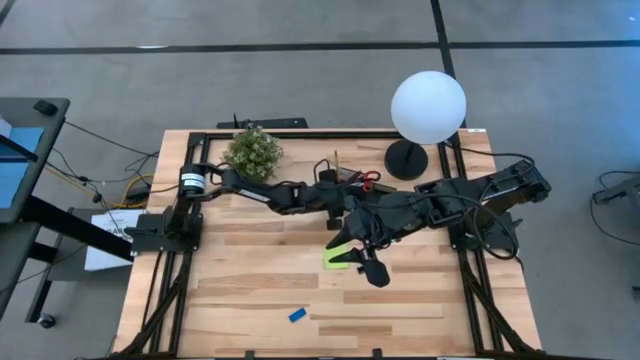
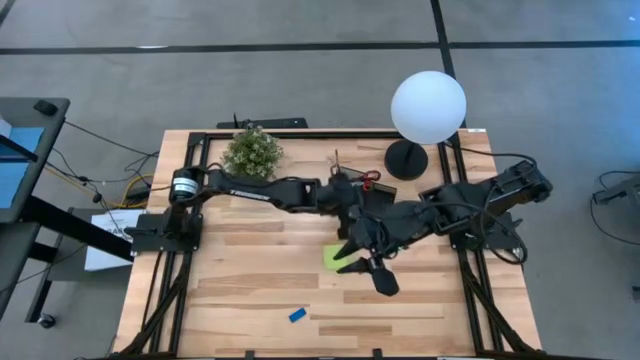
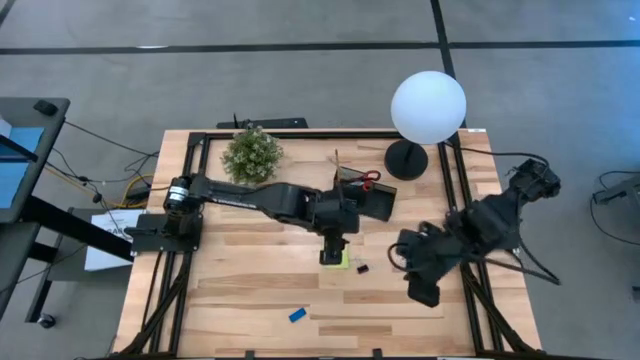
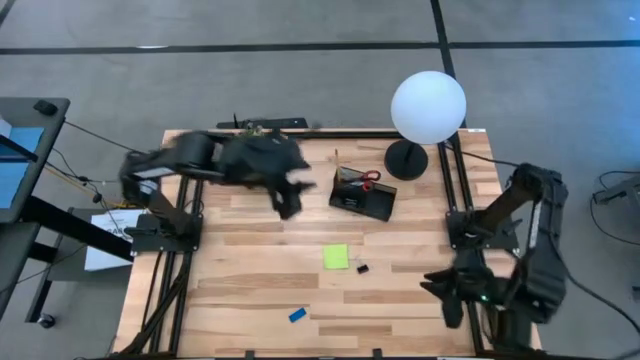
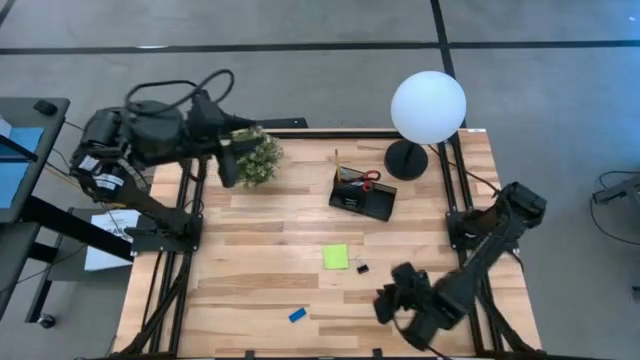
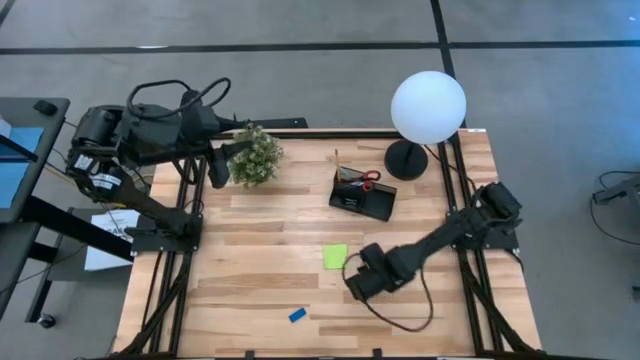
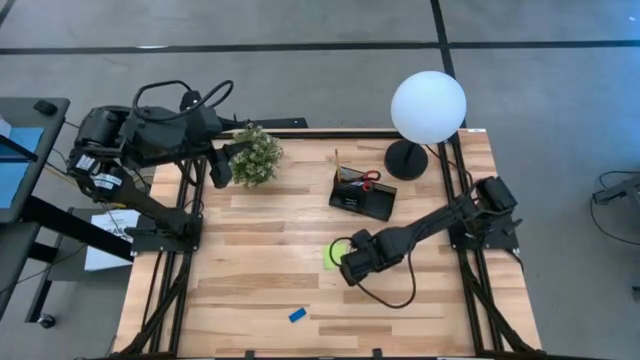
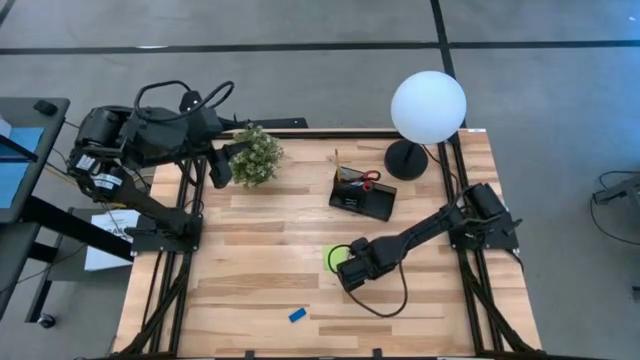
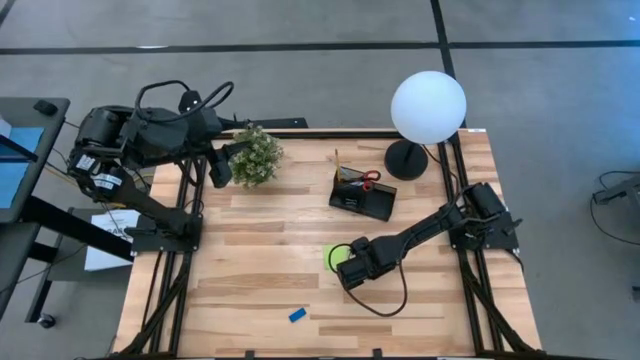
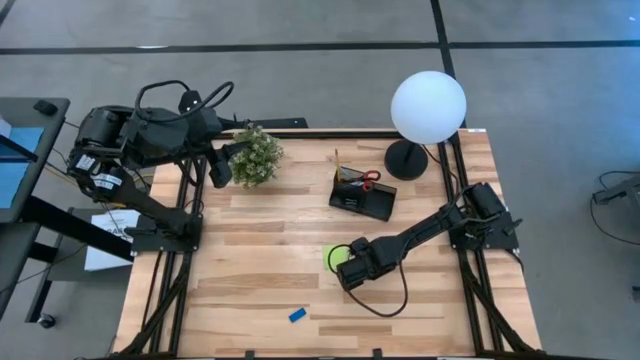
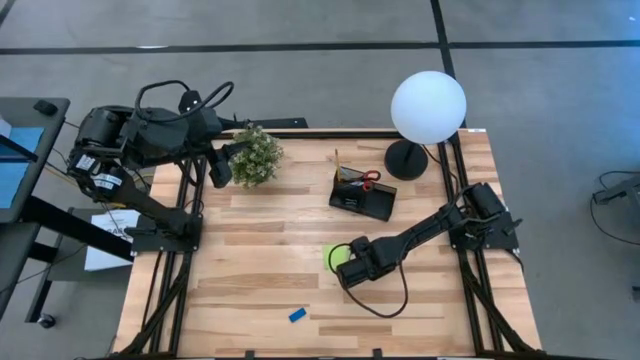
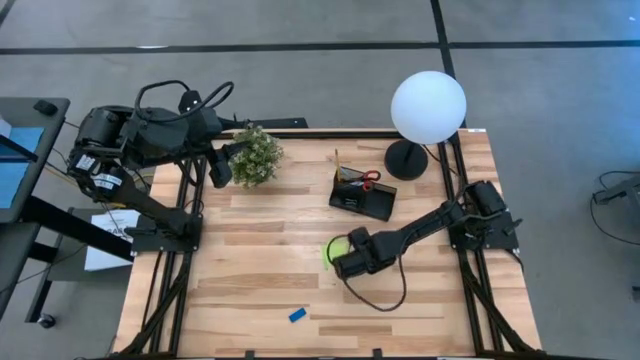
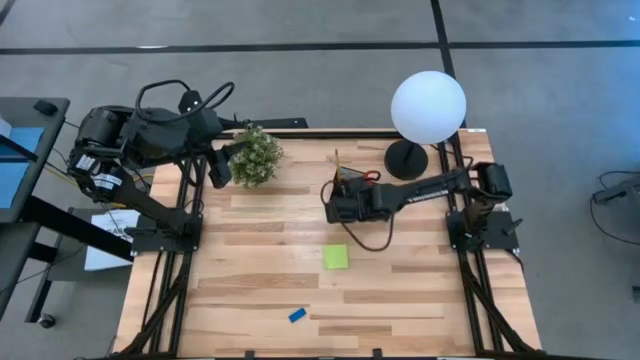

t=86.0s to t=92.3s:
Task: Pick and place office supplies into organizer
Put the binder clip into the black desk organizer

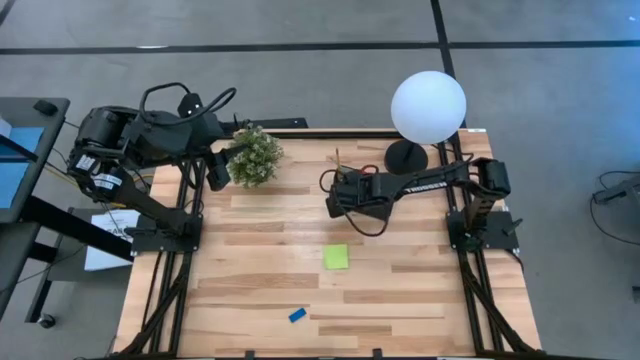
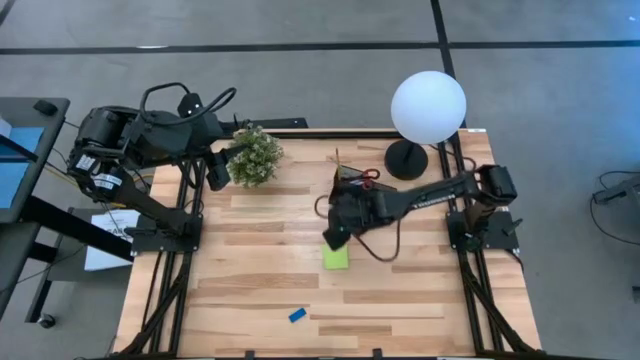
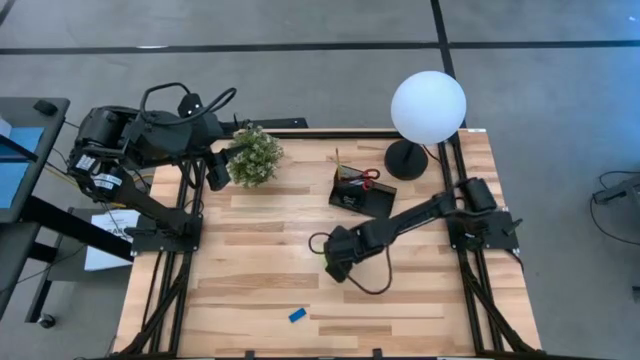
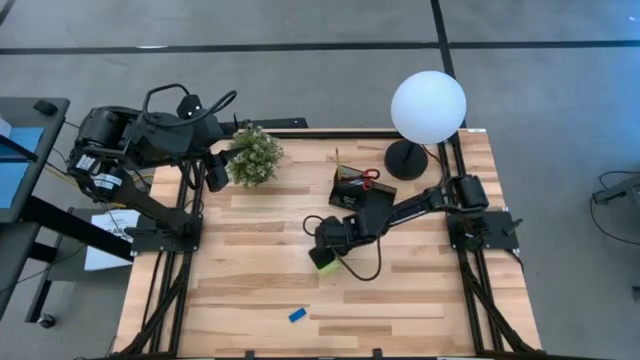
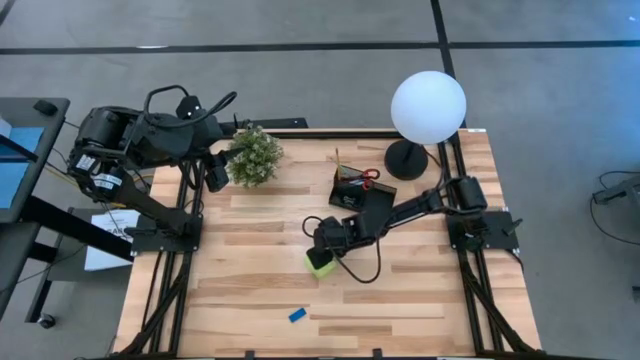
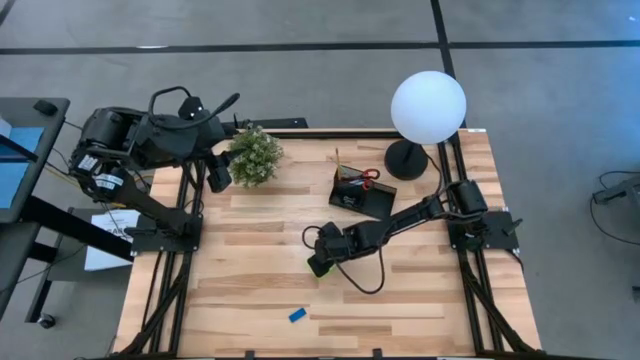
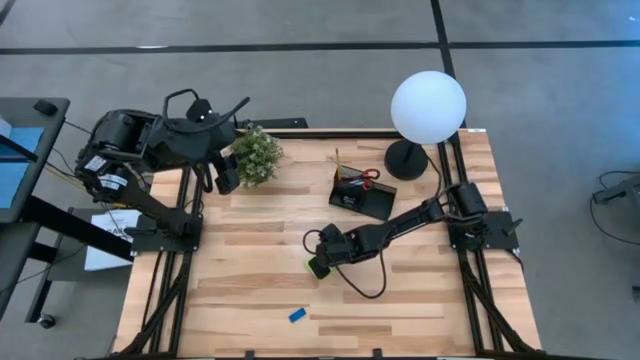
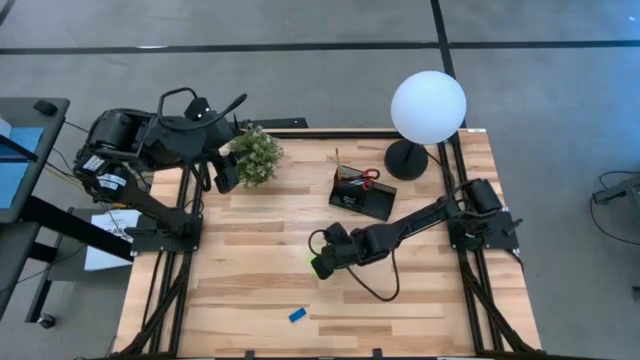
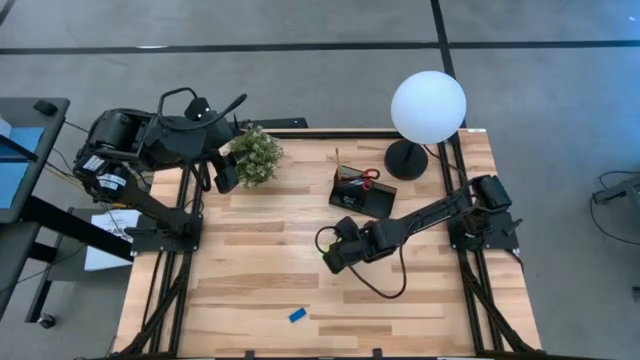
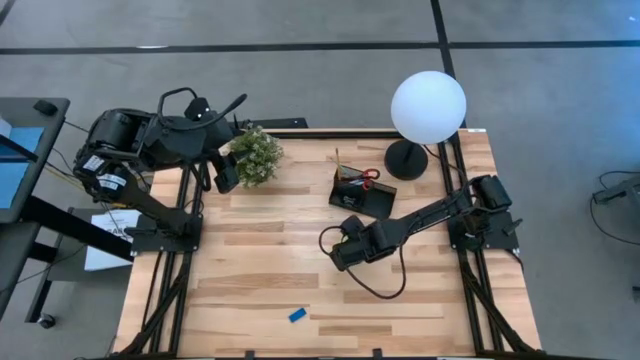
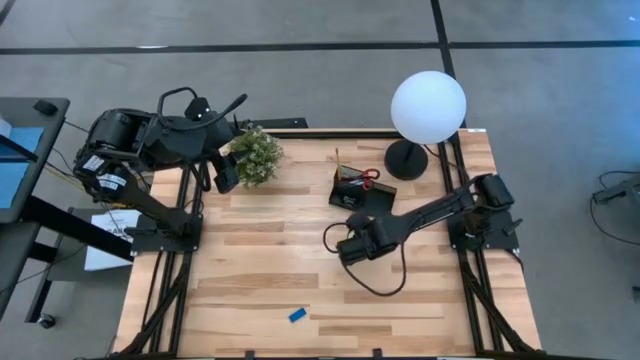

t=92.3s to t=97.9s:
Put the green sticky note into the black desk organizer

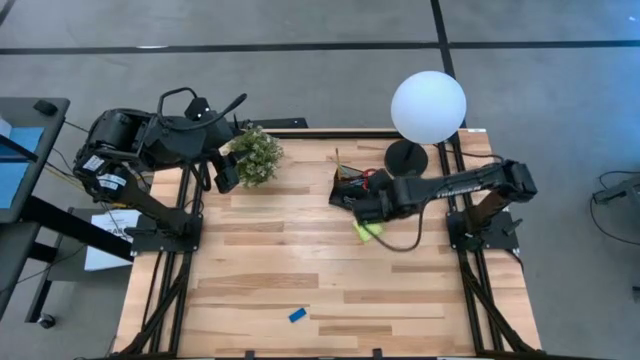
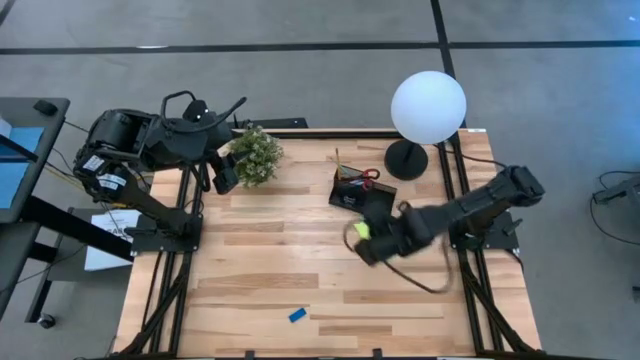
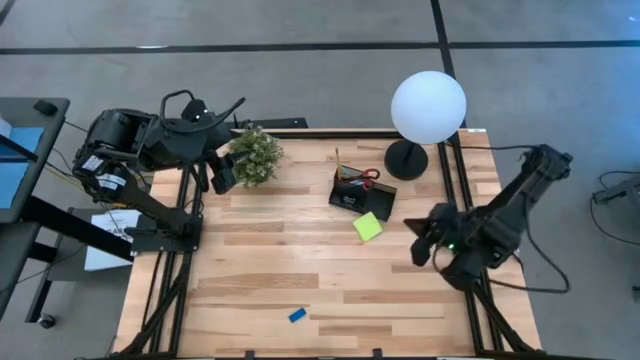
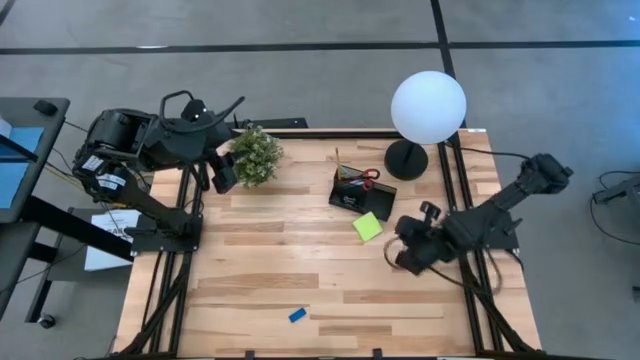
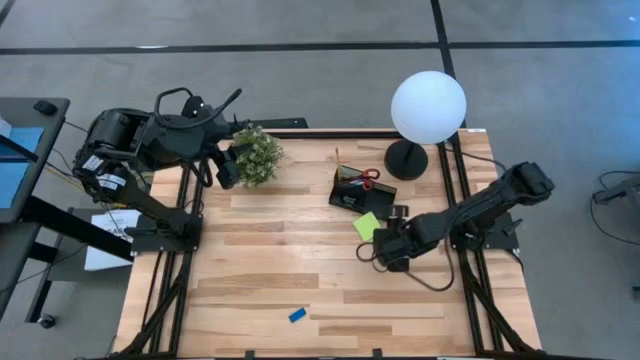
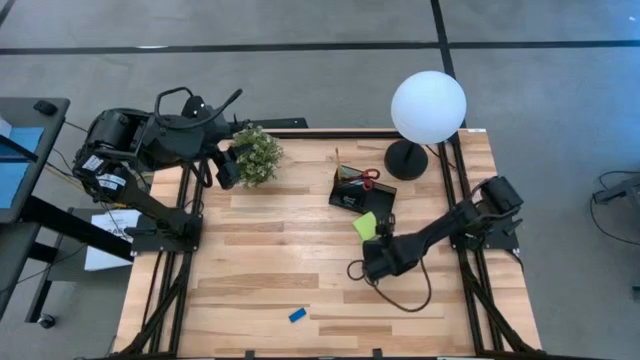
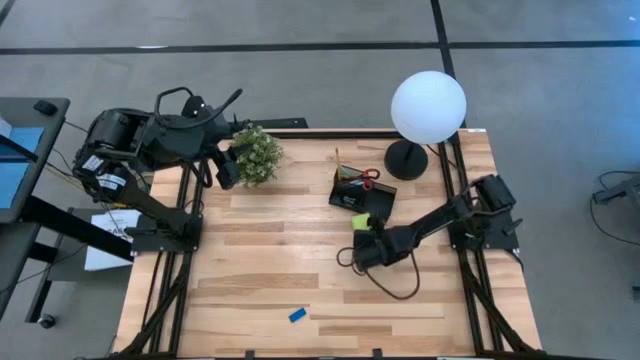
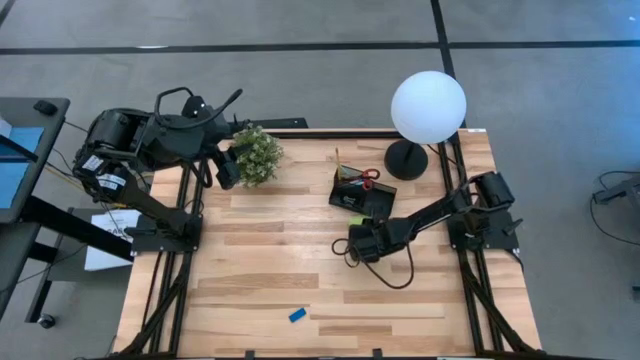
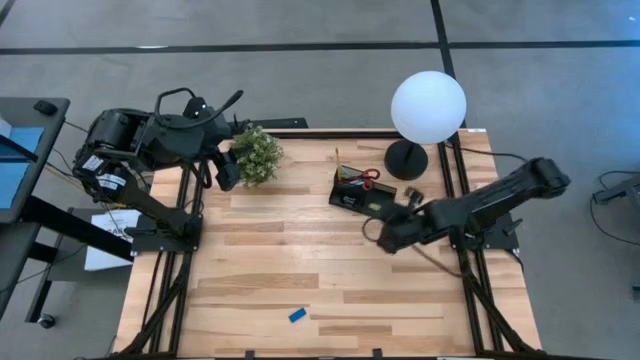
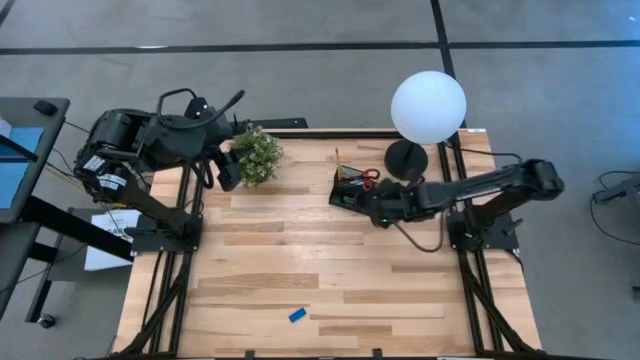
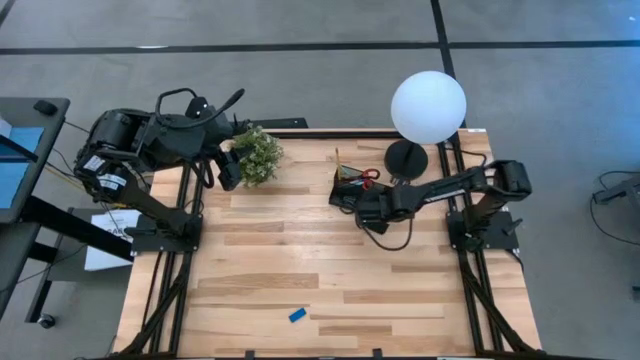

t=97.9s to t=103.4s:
Put the green sticky note into the black desk organizer

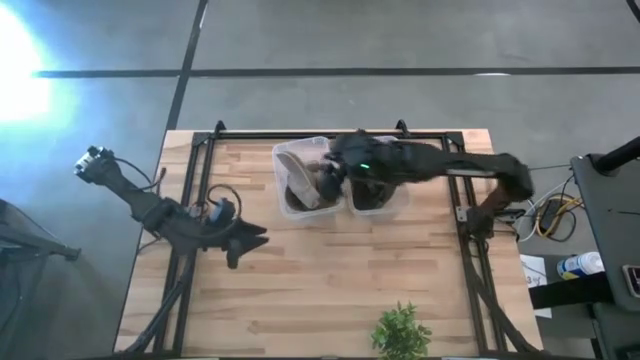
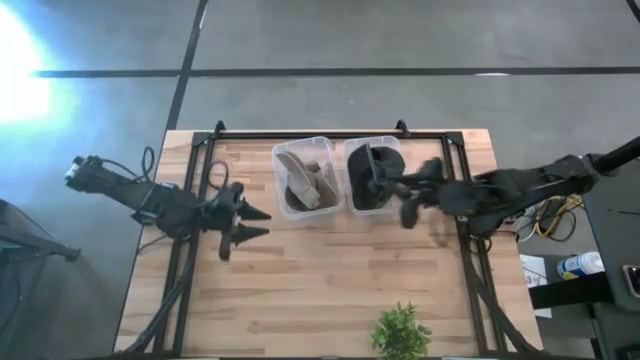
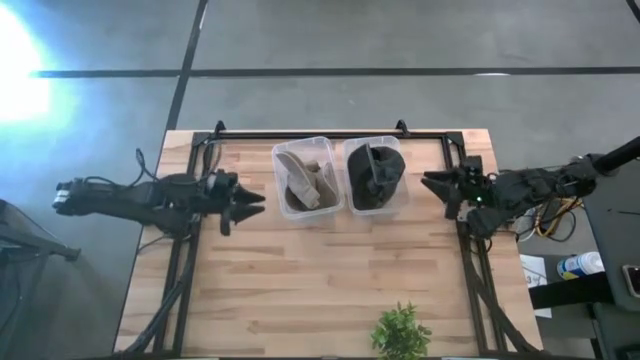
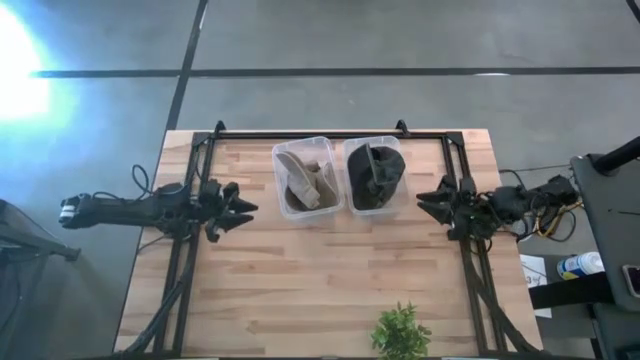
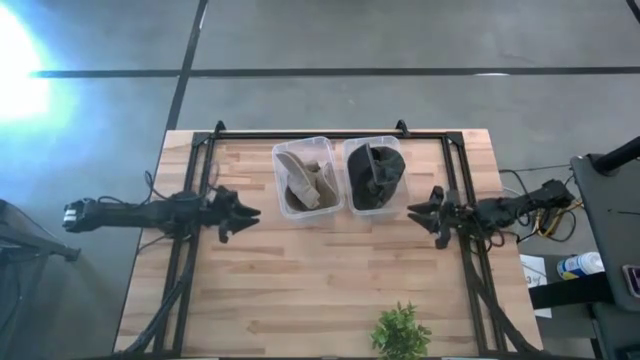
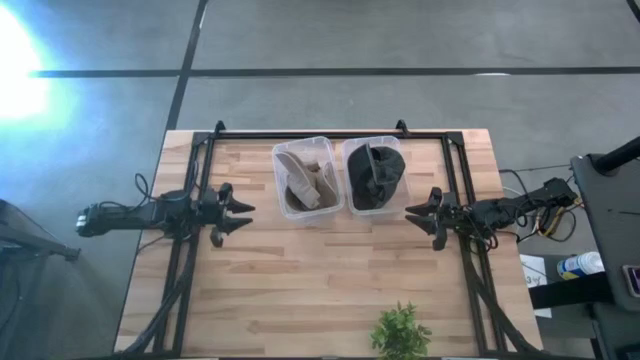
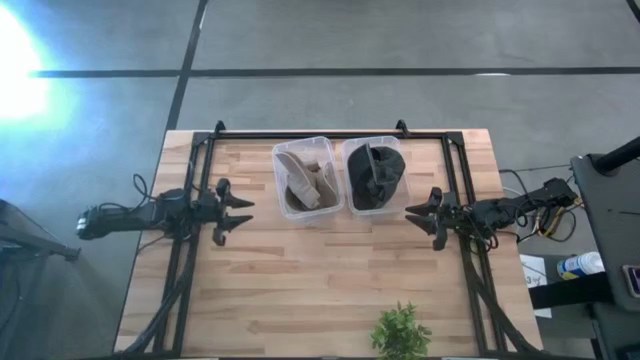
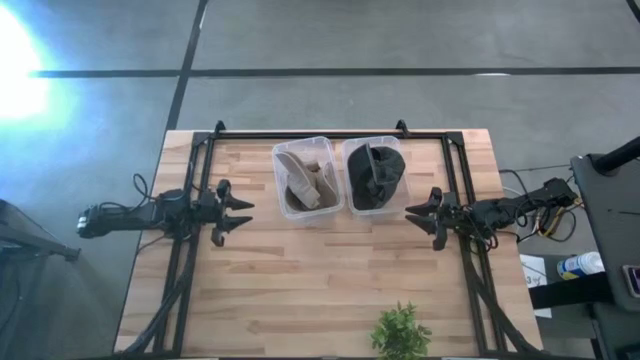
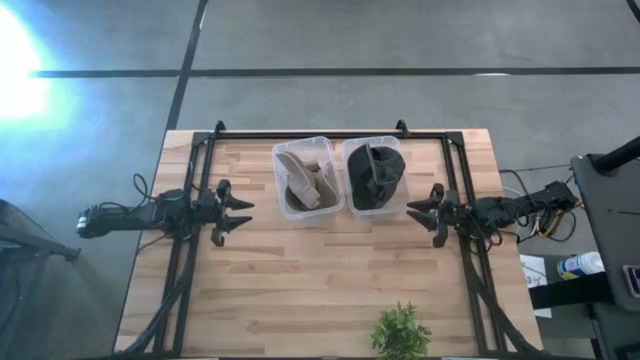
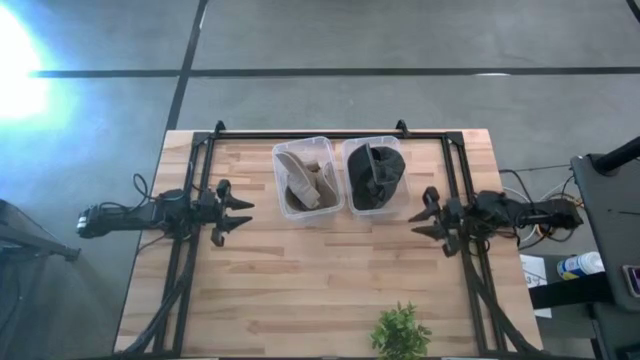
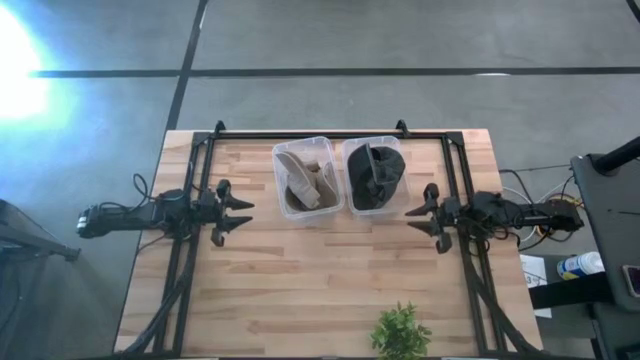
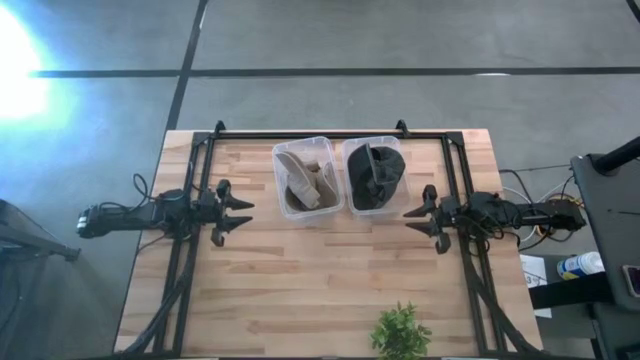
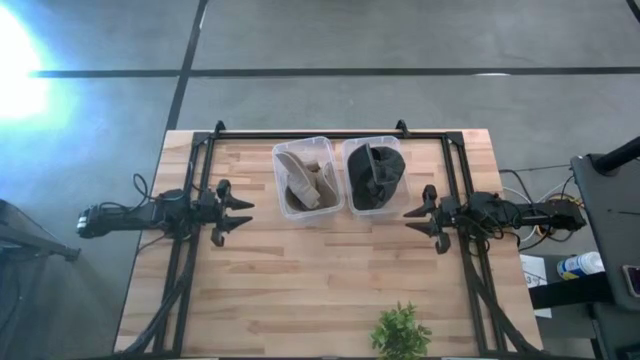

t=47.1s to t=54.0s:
Task: Pick & Place hat
Return to Home Position
